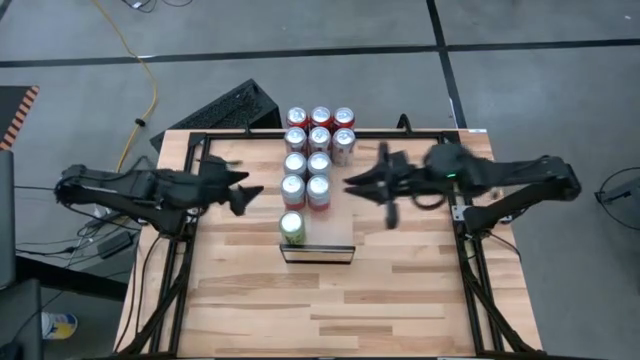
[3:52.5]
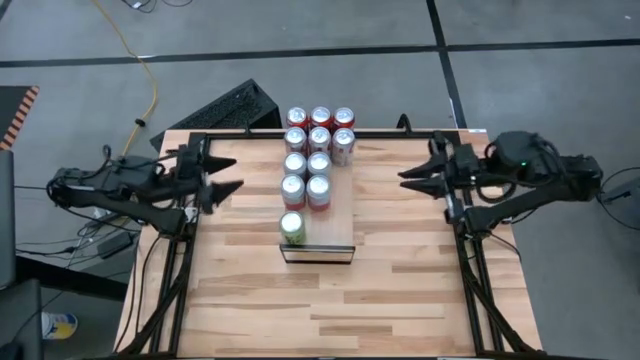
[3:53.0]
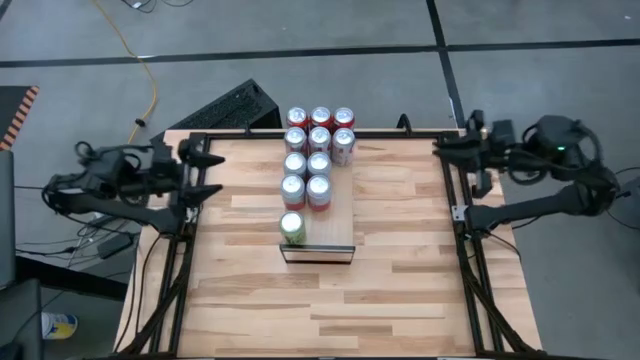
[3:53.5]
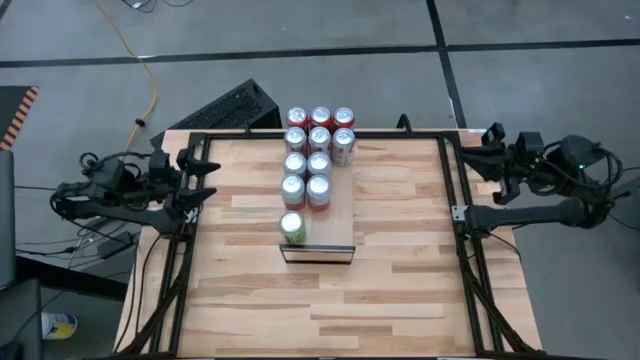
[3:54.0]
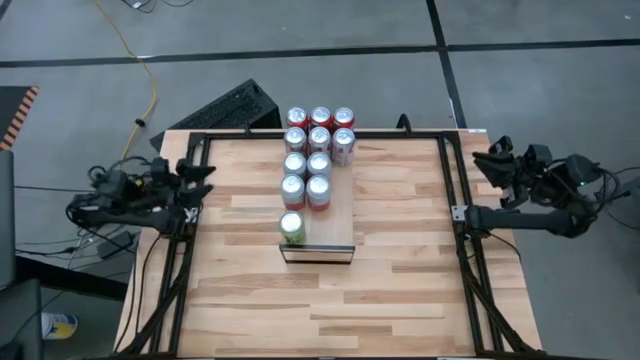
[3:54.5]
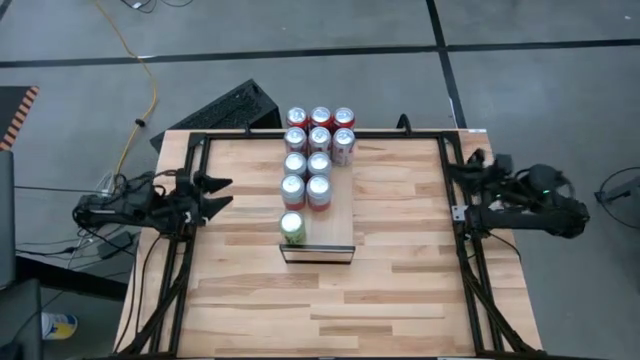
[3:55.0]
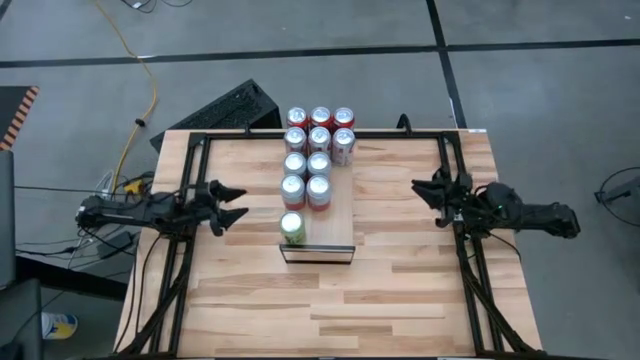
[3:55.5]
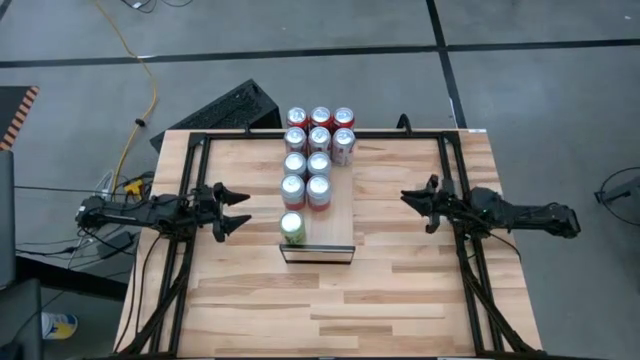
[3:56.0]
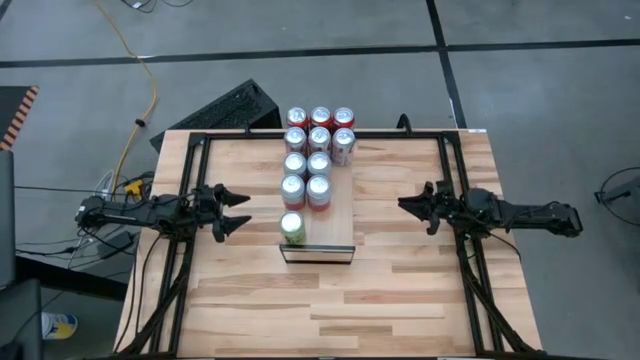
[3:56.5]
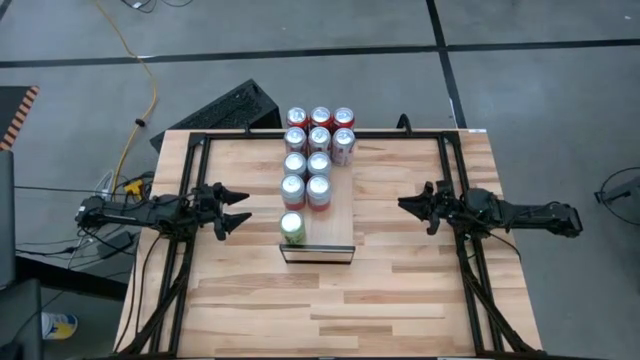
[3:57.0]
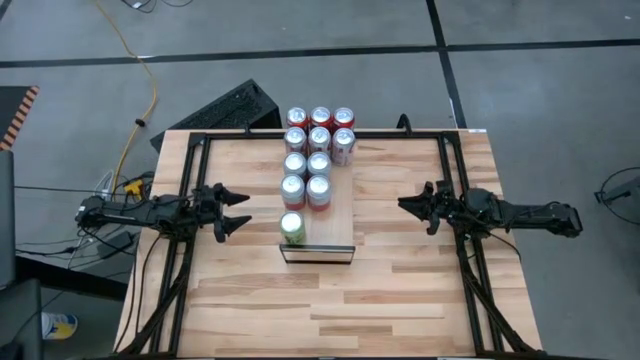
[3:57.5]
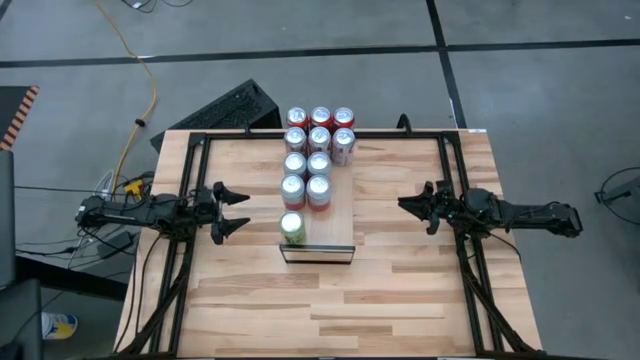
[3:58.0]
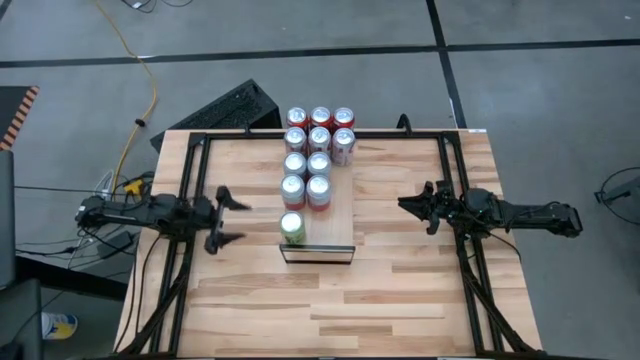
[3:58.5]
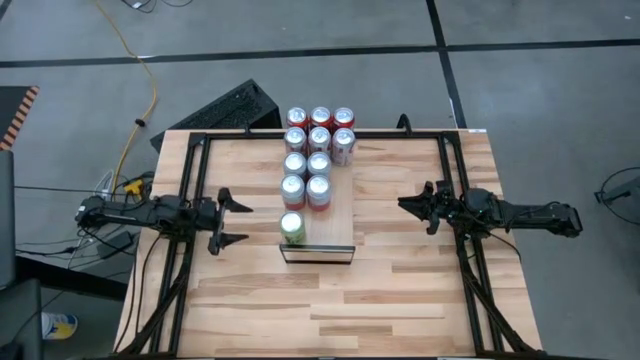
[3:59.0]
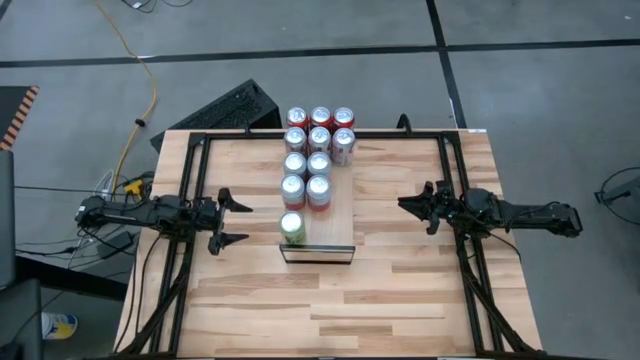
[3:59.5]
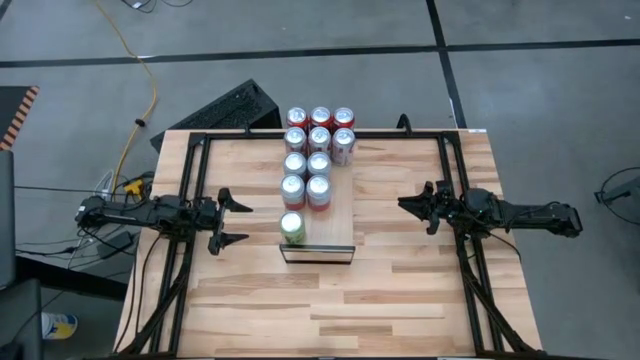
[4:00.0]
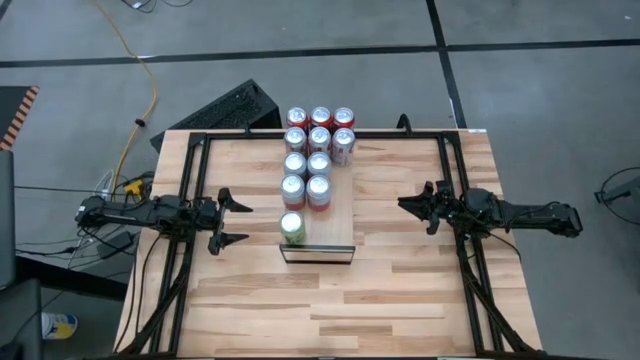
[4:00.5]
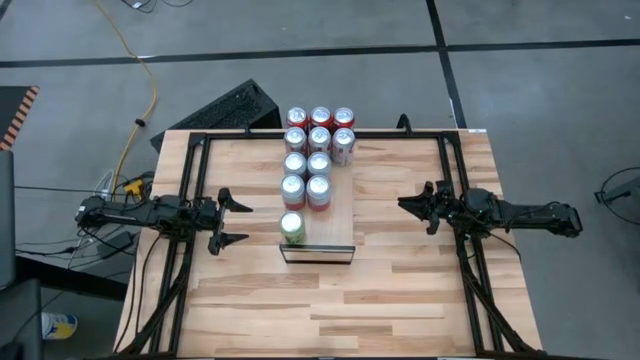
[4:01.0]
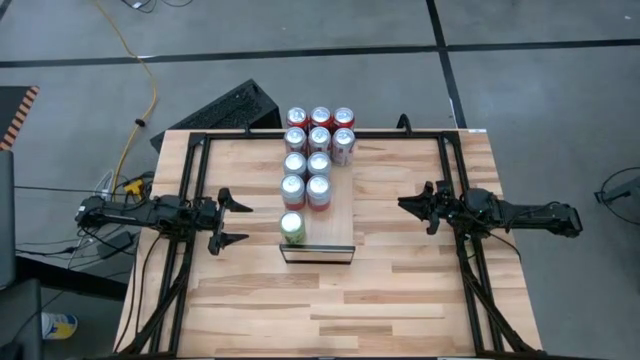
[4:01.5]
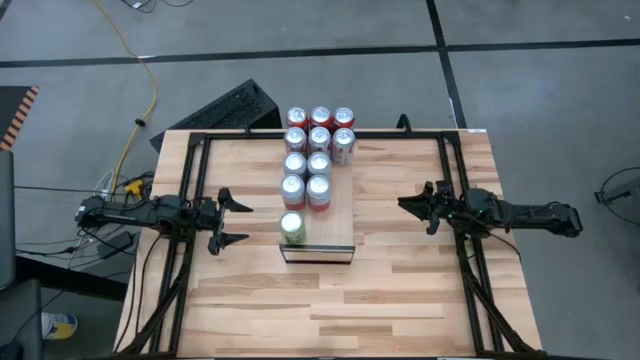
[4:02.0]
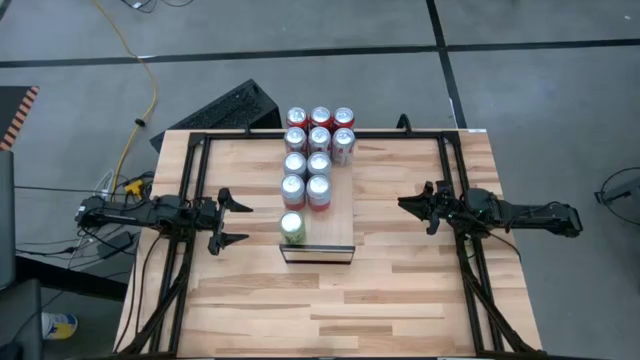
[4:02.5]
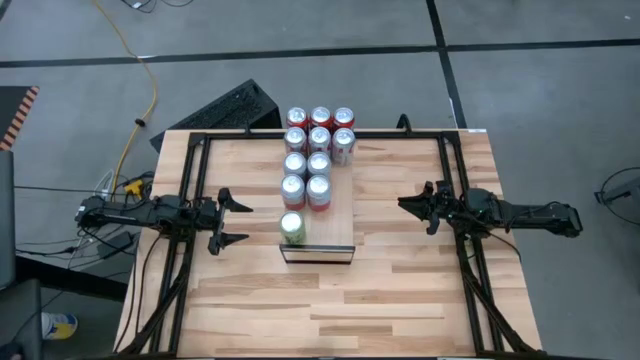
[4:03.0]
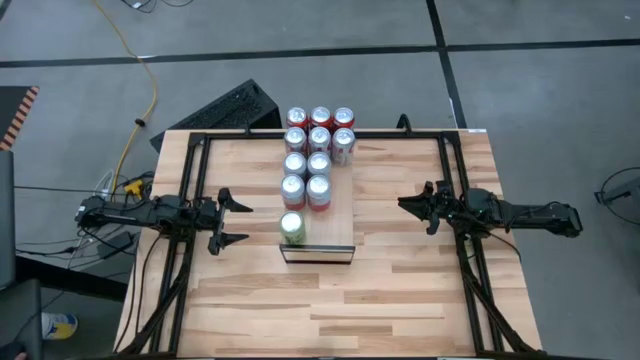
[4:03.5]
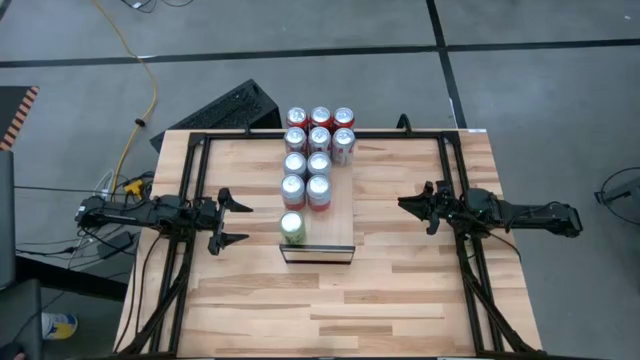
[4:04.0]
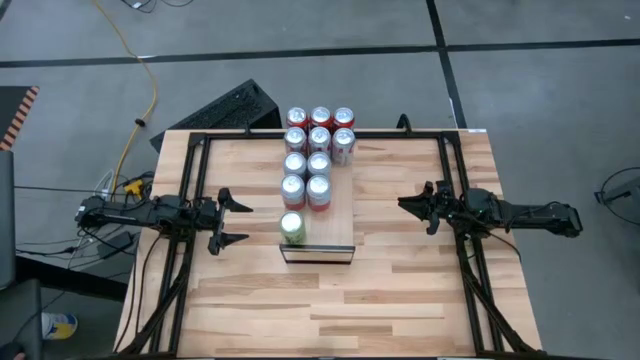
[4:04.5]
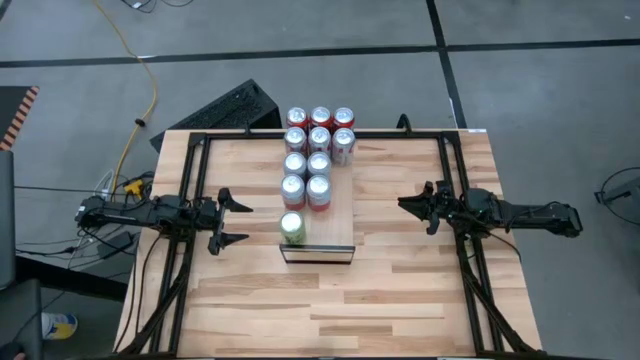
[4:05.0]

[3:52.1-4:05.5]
Task: Place canned beverage on shelf
Return to Home Position

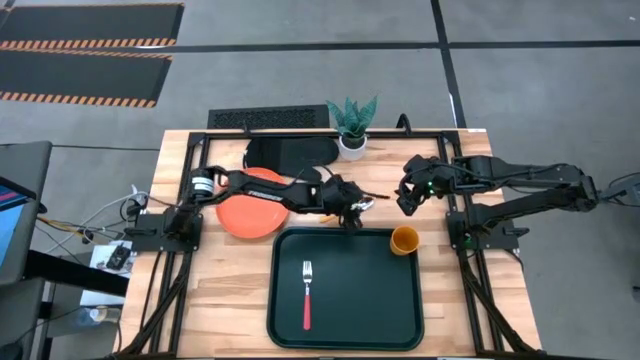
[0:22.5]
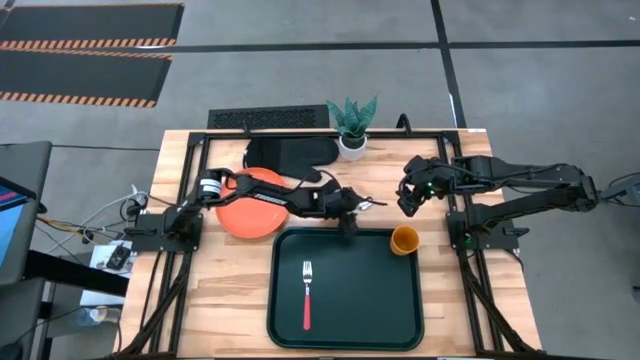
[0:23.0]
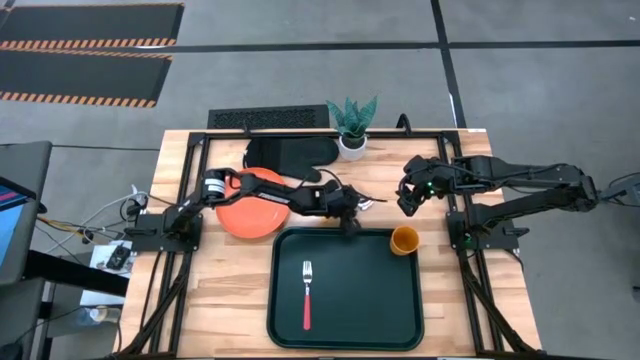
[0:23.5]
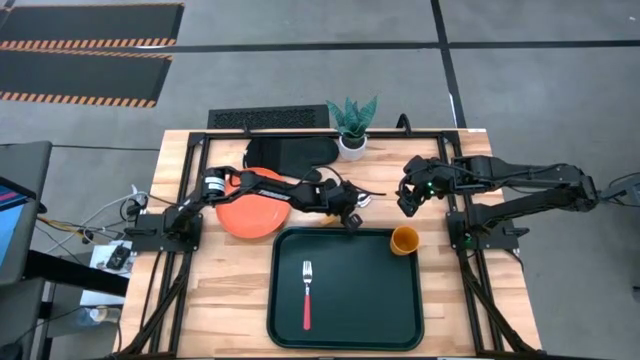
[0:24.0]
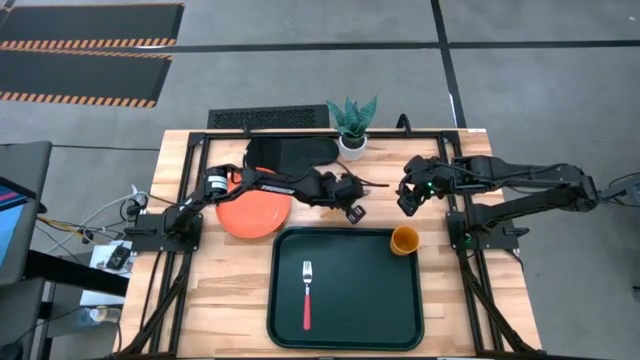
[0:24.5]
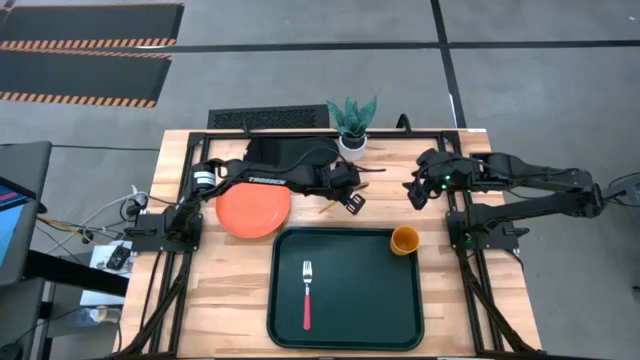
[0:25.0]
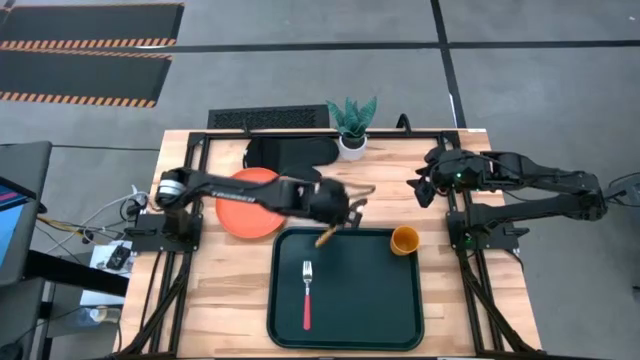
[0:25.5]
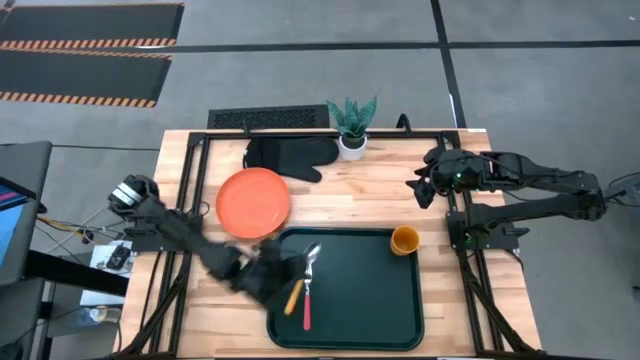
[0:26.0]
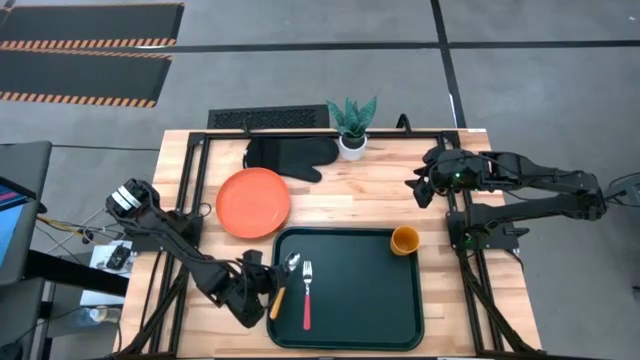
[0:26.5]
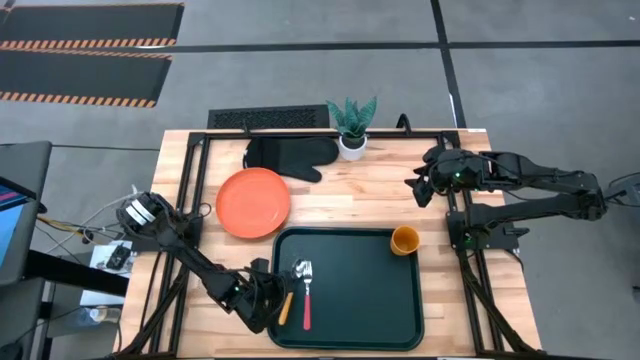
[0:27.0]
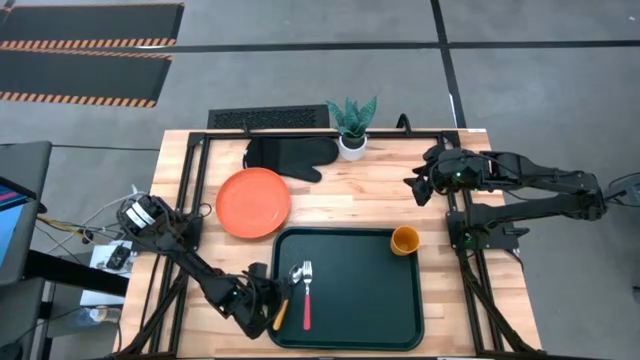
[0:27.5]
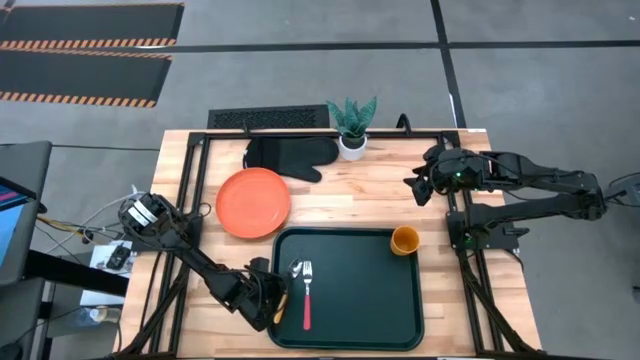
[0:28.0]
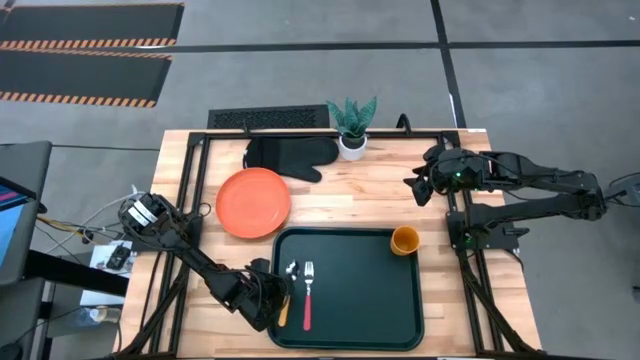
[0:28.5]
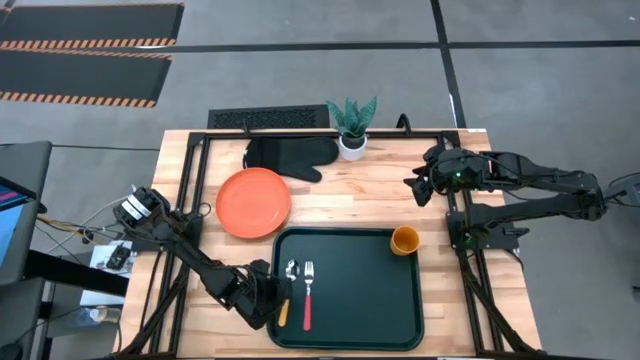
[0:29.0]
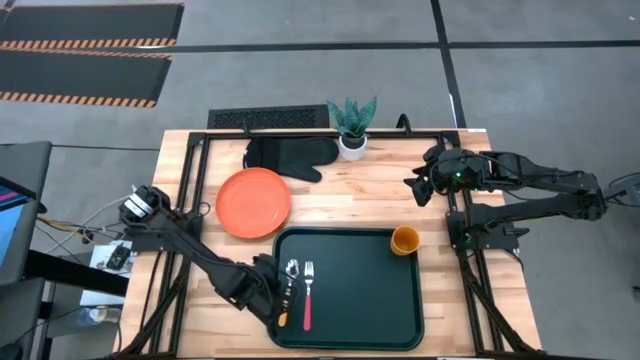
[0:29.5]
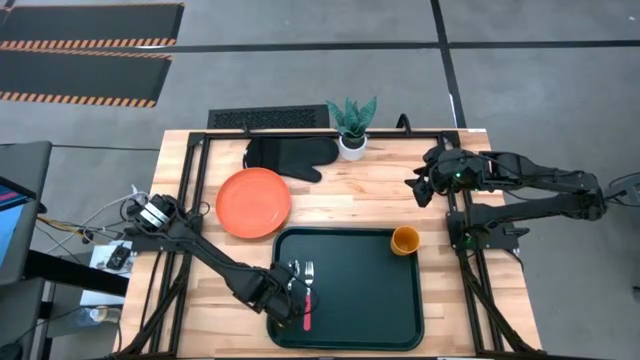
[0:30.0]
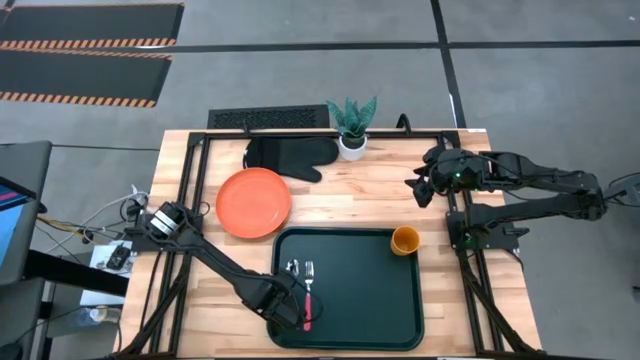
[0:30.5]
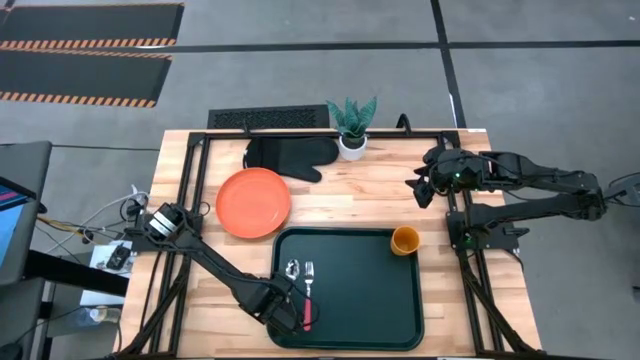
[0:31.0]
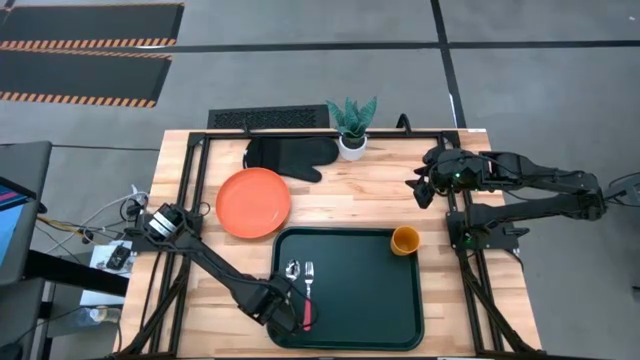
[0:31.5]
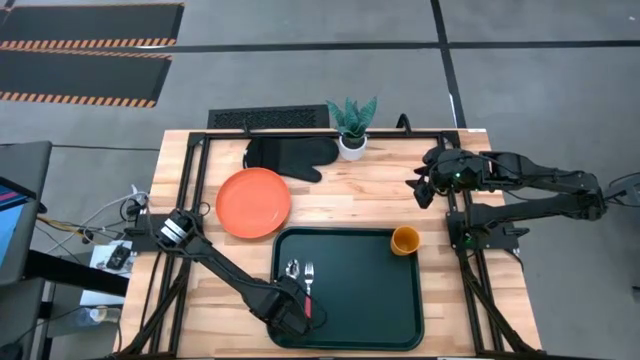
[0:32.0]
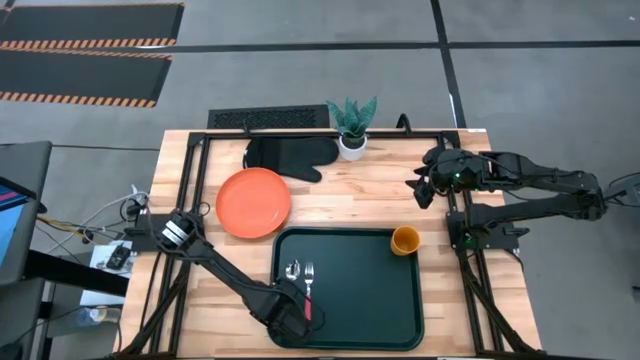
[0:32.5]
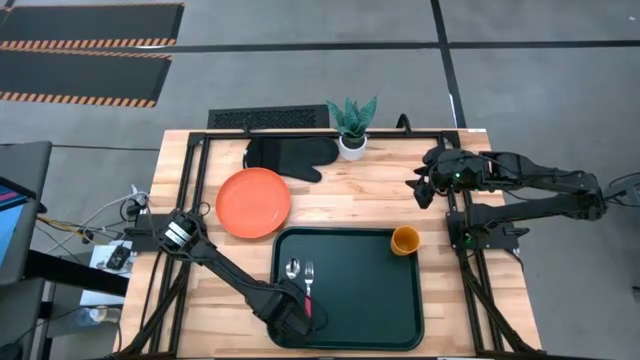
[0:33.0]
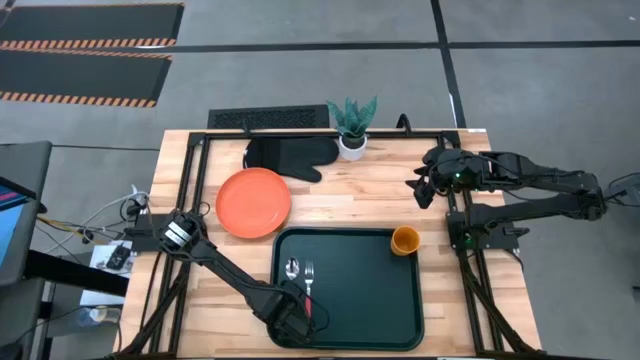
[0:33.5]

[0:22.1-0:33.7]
Task: Pick and place plate/cup/fork/spoon on tray
Put the yellow spoon on the black tray to the left of the pink fork
